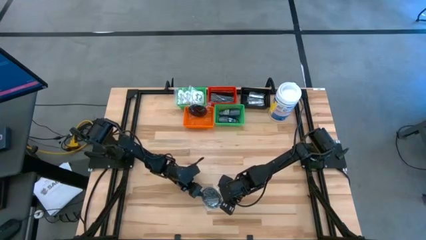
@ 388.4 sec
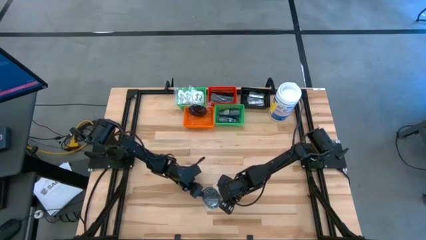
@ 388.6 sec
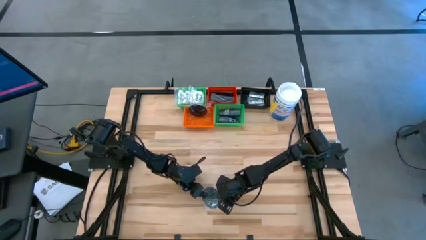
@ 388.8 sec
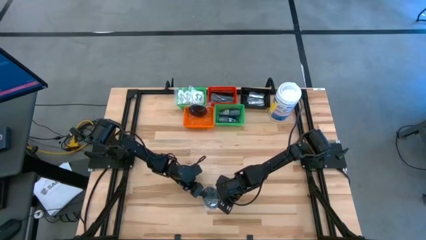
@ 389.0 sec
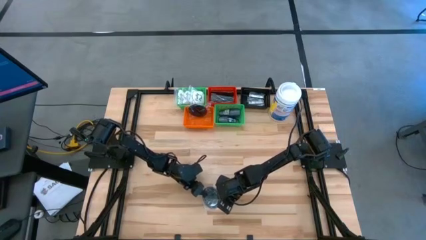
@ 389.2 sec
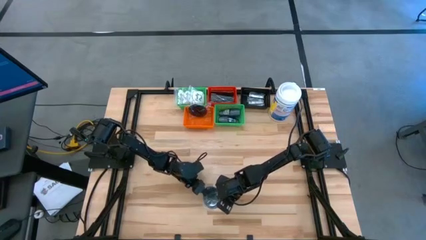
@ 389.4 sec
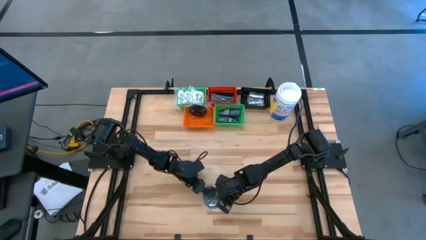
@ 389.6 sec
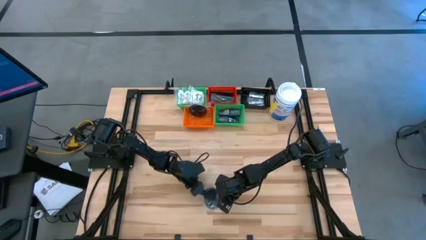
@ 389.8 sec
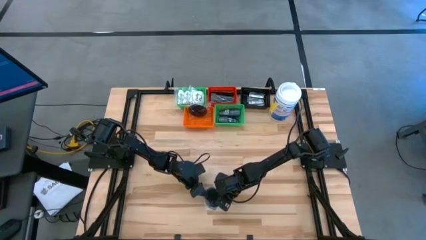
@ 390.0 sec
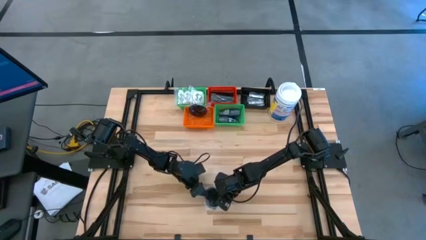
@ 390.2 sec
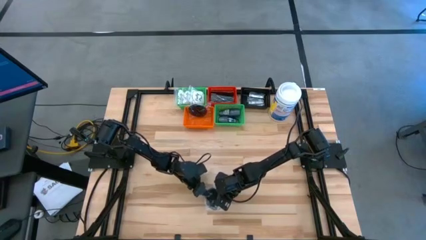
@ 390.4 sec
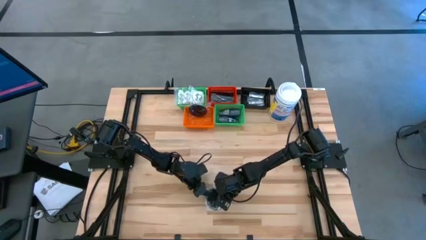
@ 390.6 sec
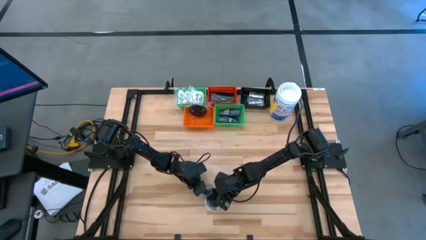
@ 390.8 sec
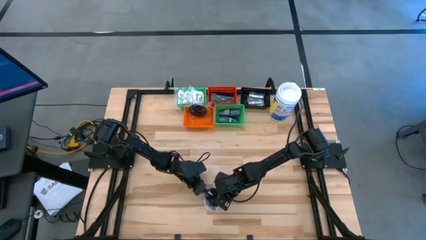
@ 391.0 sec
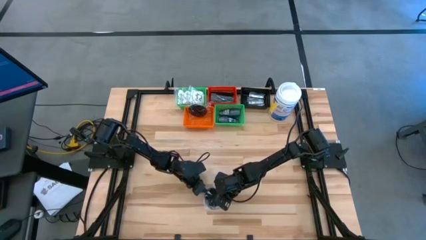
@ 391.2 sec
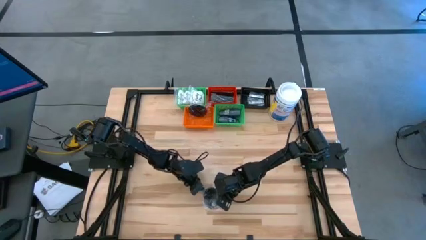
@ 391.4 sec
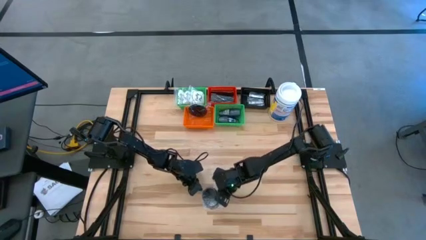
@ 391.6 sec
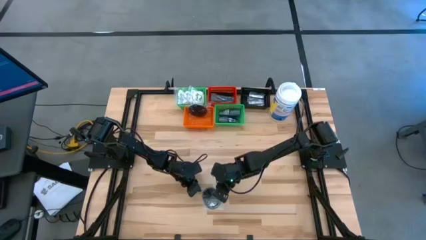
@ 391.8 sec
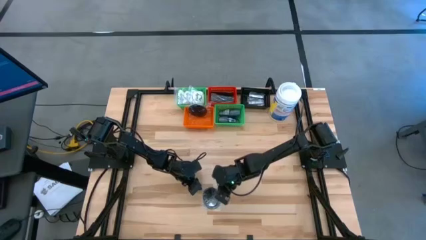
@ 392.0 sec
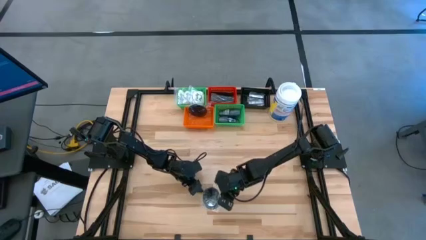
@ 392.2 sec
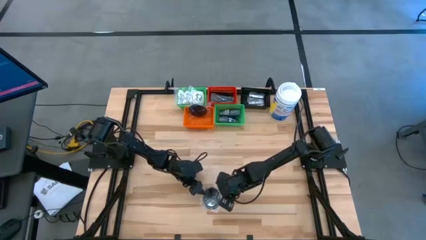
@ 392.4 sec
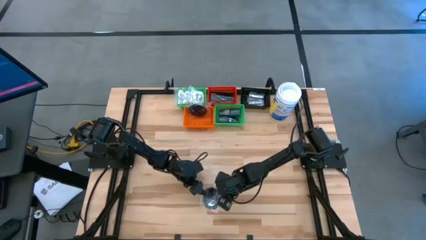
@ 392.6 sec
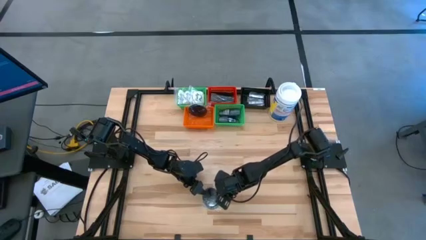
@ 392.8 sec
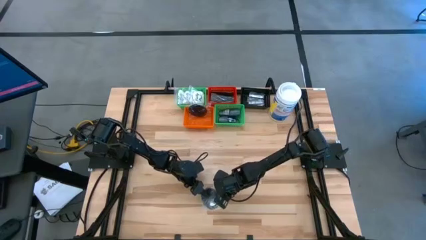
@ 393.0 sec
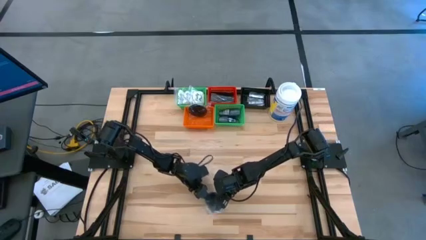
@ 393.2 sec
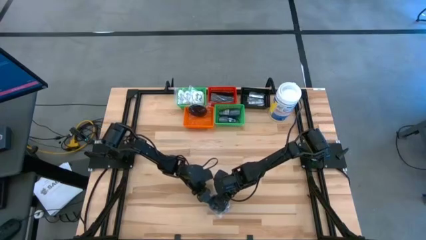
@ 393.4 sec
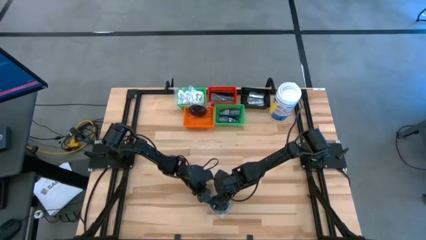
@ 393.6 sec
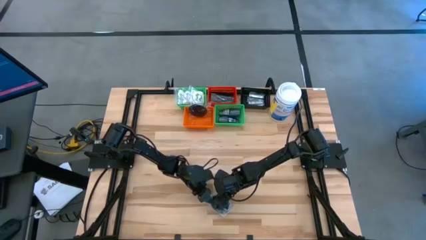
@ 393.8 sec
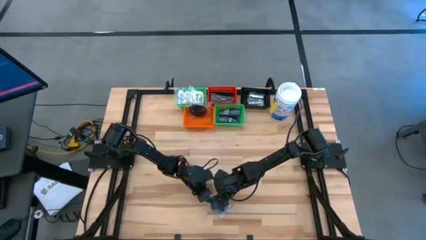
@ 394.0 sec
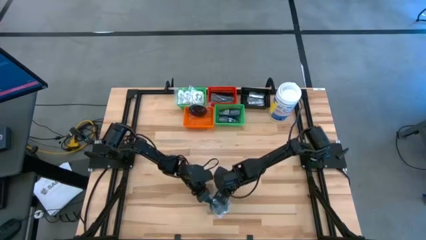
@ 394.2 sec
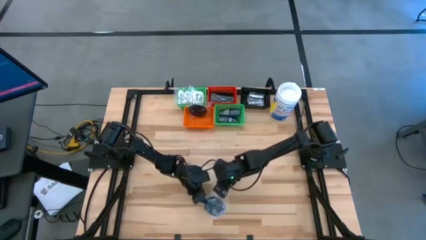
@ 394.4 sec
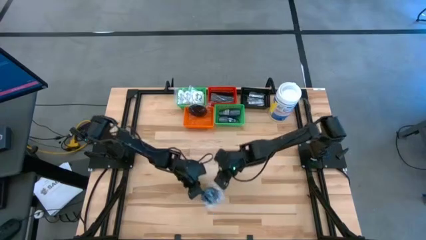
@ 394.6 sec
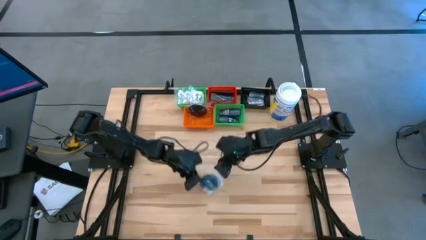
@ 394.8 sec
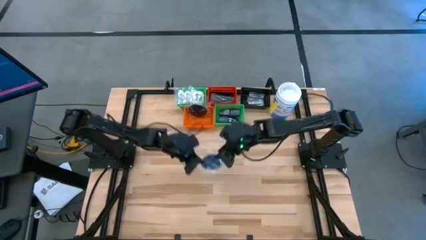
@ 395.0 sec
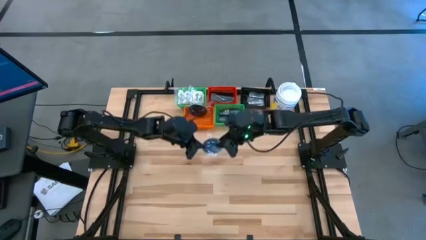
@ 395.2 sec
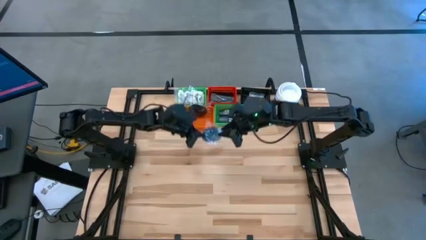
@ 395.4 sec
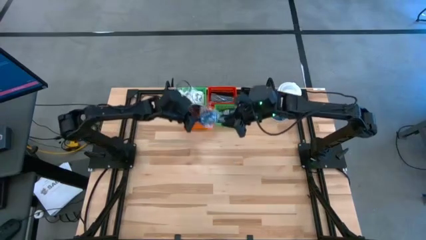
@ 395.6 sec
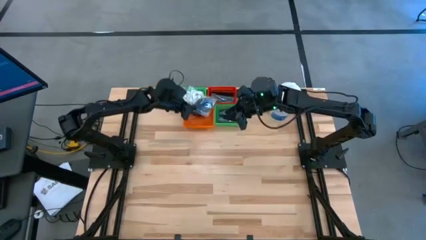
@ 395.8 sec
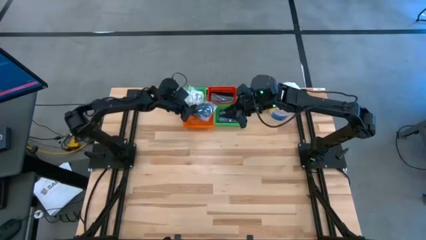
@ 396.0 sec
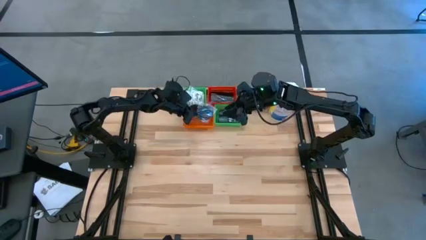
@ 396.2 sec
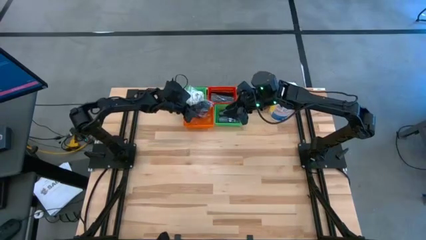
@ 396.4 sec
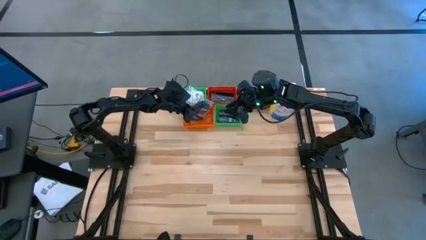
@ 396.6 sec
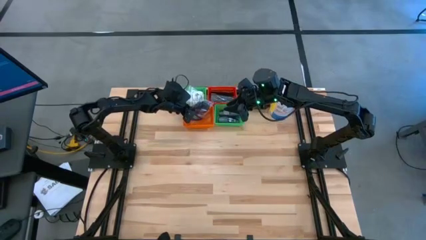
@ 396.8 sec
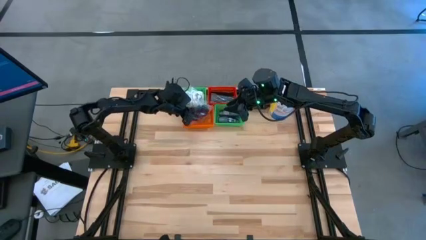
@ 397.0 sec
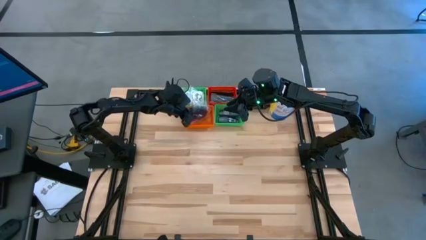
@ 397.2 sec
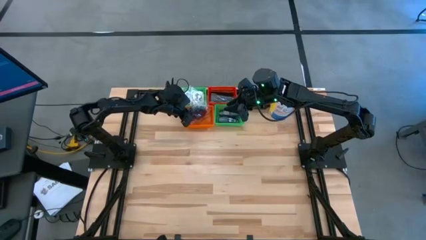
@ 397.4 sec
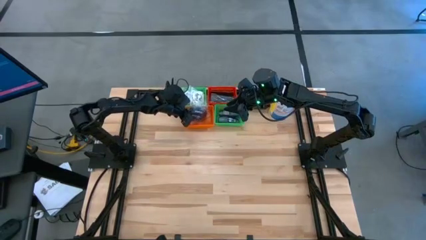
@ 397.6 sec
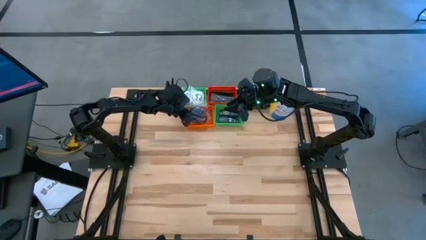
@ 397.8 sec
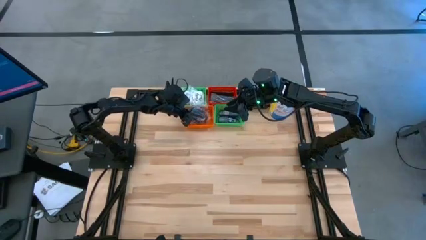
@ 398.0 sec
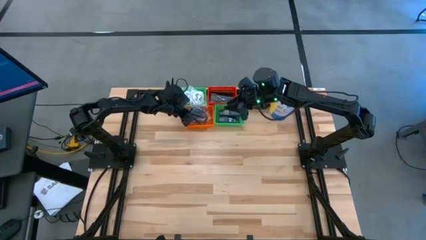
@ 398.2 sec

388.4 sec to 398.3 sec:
Task: Pick & Place Travel size toiletries
Put the black hair brush into the orange bin

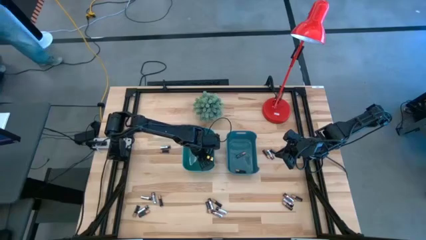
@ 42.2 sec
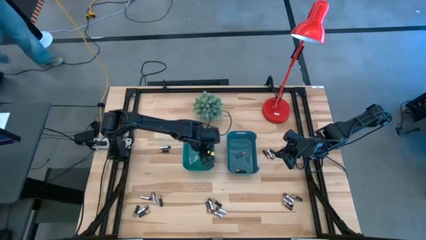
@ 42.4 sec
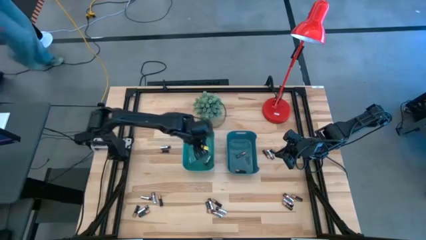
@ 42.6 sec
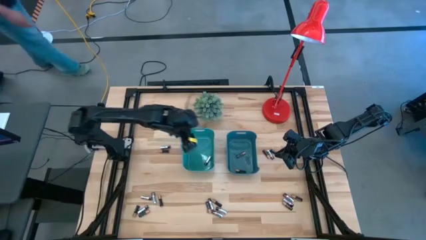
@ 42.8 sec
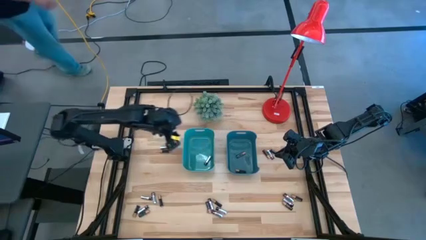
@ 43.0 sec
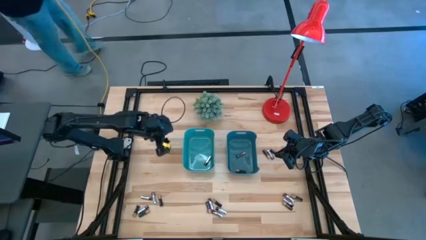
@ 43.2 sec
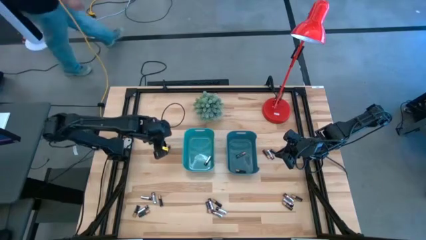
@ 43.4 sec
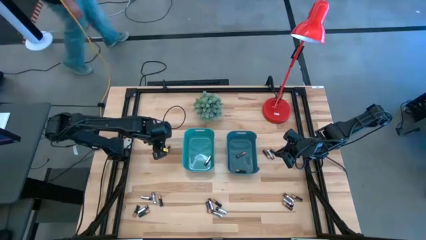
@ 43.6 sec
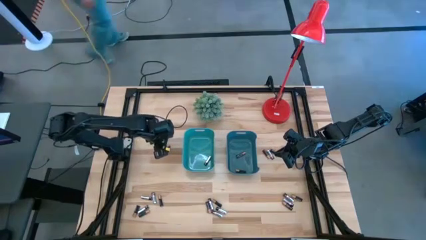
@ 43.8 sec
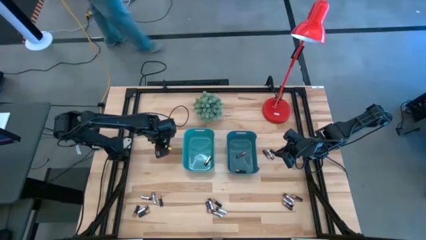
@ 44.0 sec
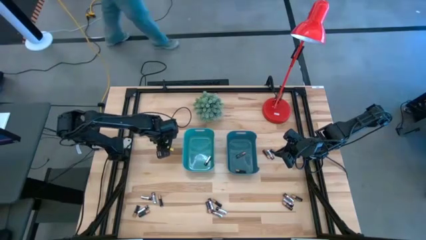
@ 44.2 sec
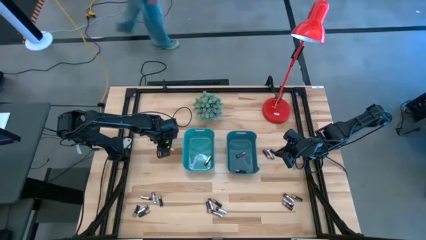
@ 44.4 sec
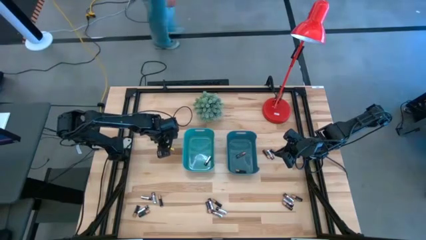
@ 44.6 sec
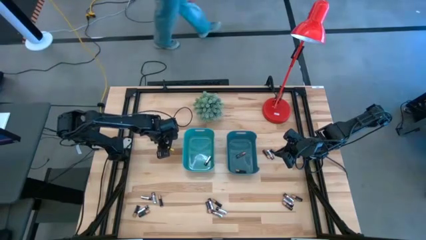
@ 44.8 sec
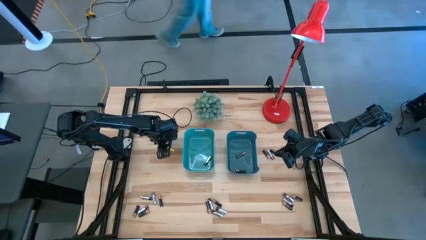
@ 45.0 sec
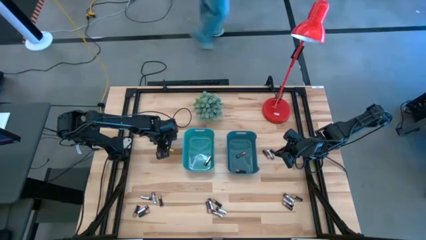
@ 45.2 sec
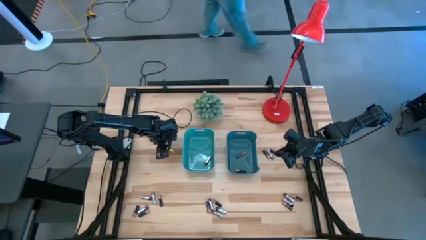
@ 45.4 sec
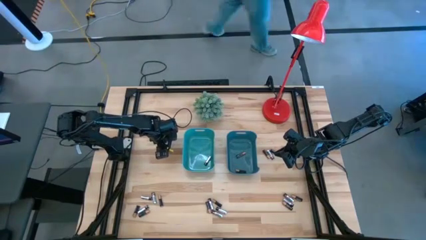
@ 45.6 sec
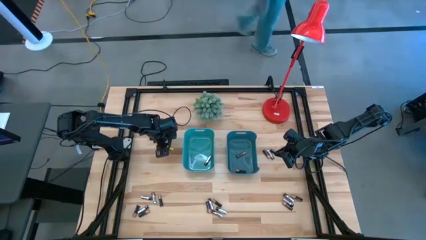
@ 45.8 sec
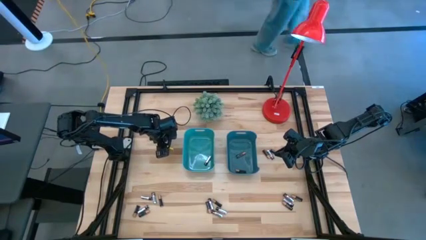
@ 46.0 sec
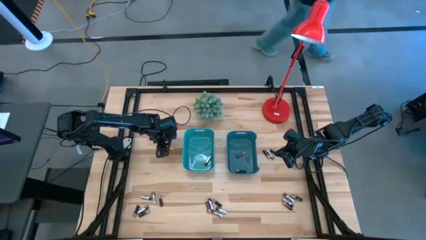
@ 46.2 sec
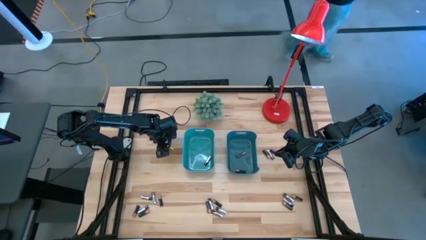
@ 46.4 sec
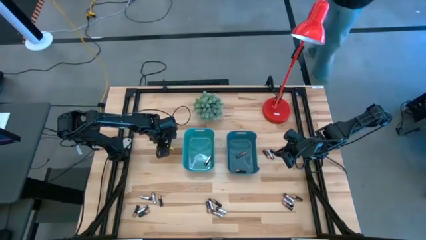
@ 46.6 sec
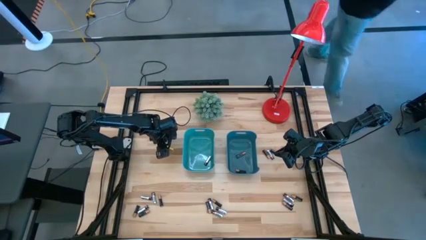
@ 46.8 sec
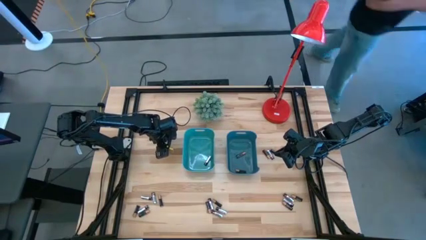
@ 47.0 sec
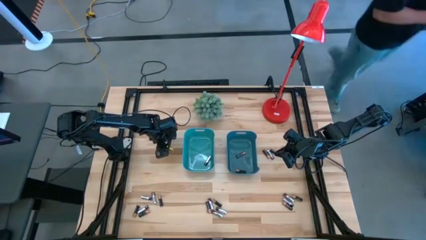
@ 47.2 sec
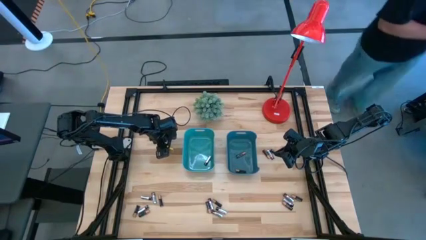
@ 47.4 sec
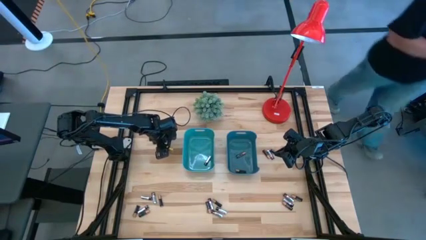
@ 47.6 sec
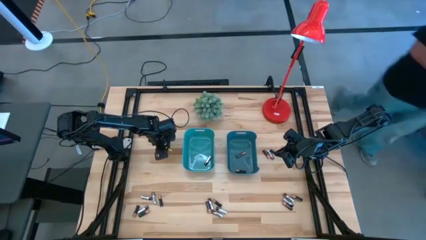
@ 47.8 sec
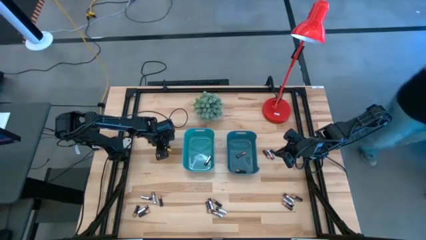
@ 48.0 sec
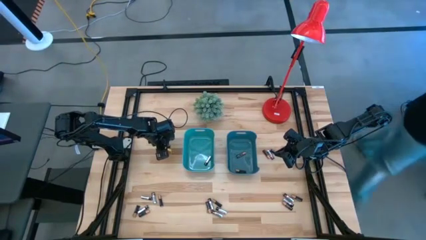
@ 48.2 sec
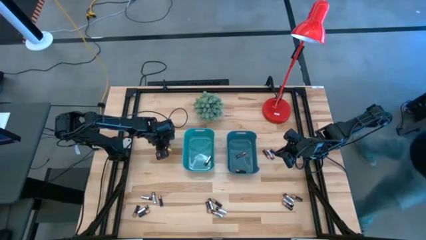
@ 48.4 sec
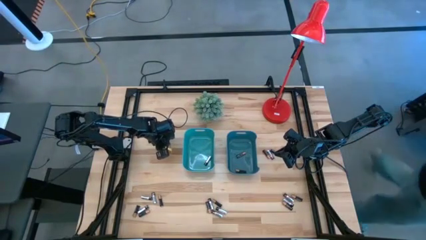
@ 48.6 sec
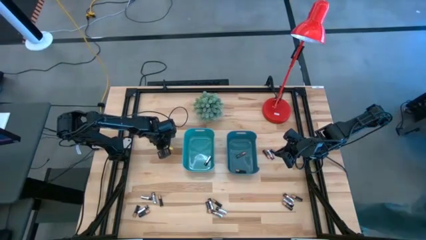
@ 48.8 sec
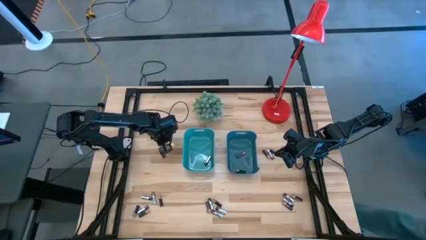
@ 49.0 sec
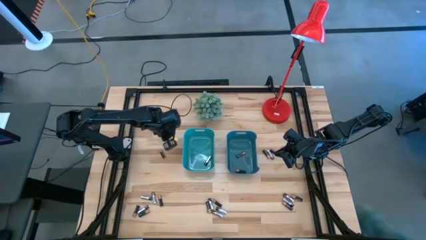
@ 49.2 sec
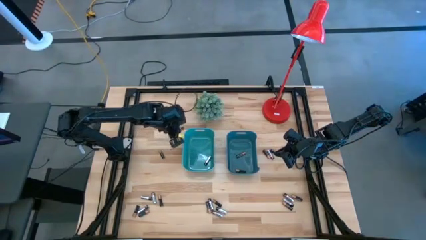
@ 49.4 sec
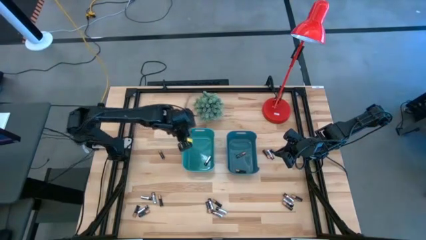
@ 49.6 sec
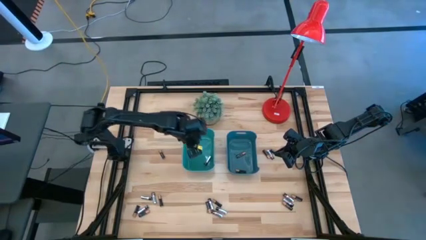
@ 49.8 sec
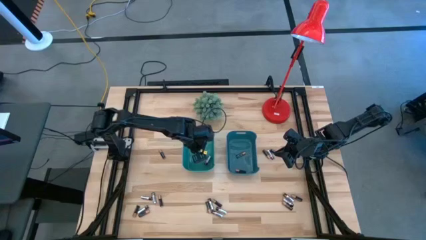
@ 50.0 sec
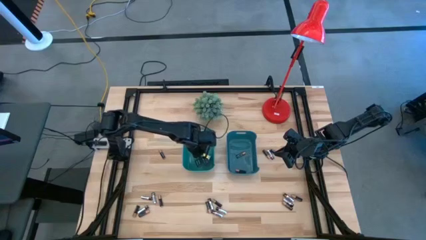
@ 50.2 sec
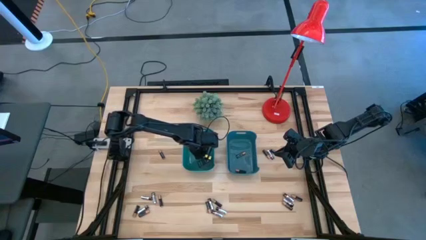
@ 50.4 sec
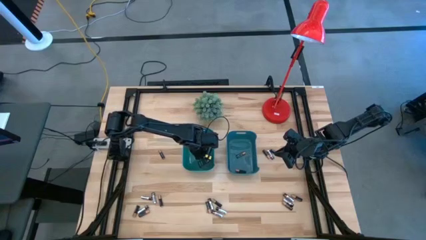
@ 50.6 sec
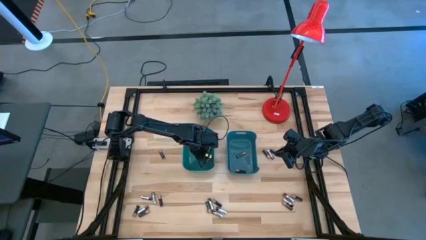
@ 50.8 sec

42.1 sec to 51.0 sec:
Task: Sort batteries
Put the silver battery into the green bin
